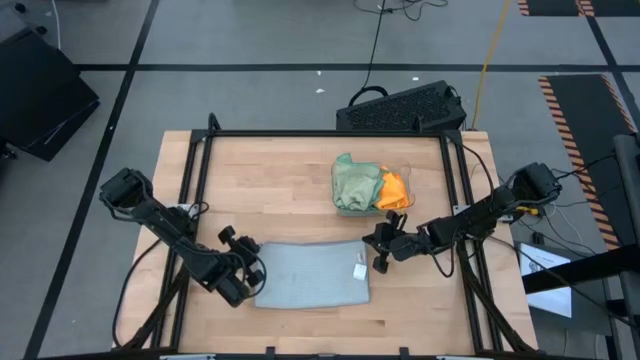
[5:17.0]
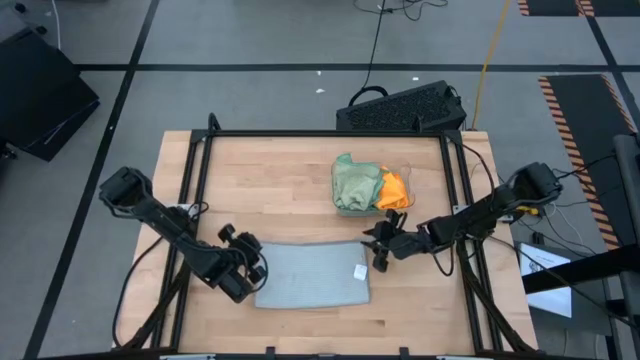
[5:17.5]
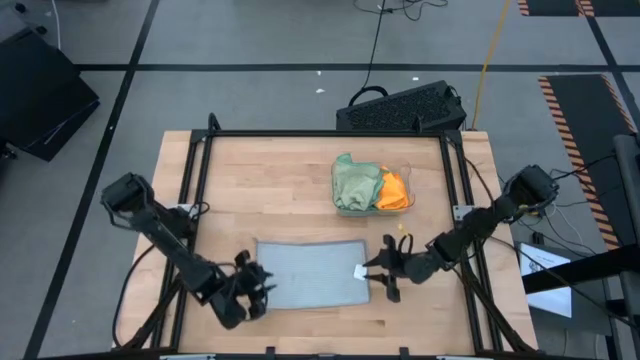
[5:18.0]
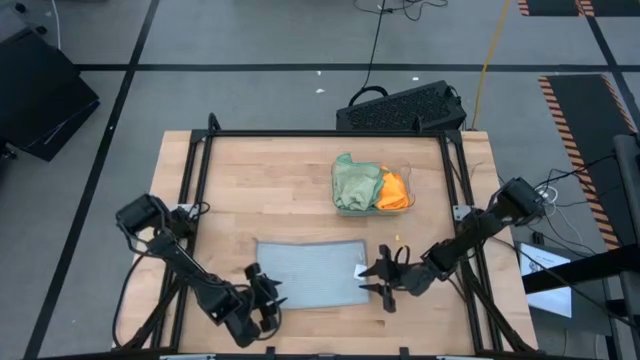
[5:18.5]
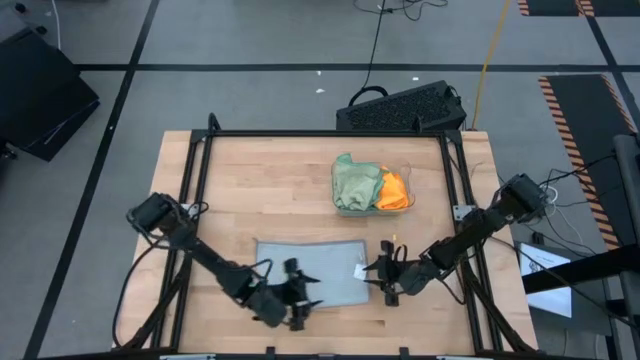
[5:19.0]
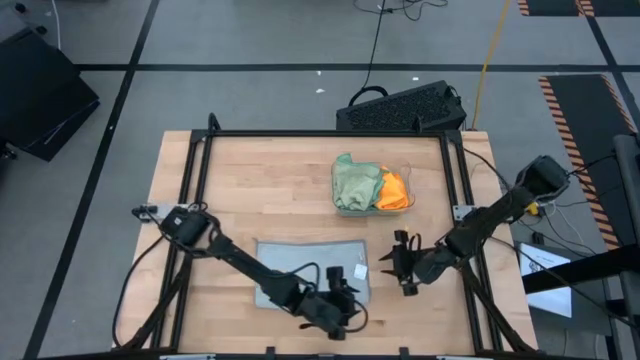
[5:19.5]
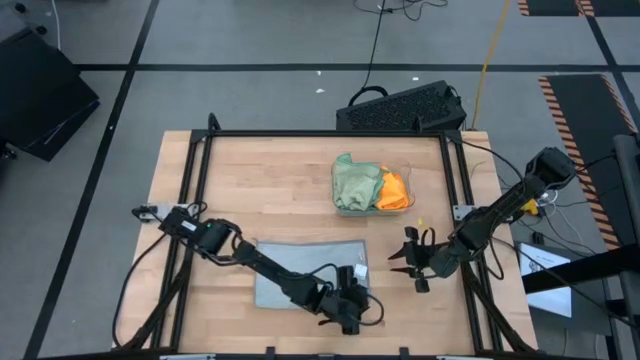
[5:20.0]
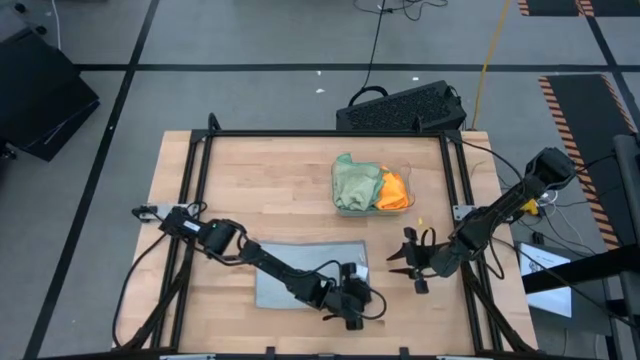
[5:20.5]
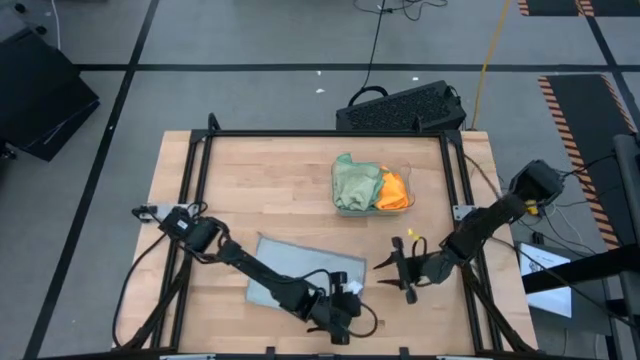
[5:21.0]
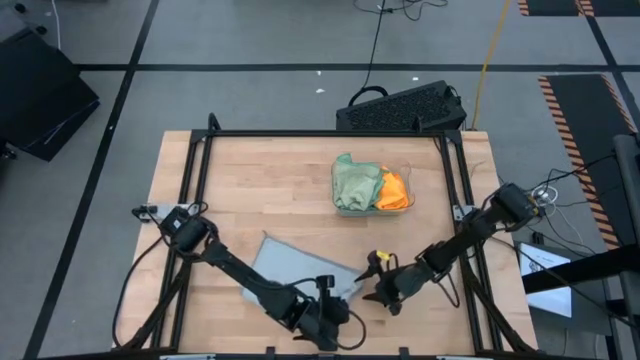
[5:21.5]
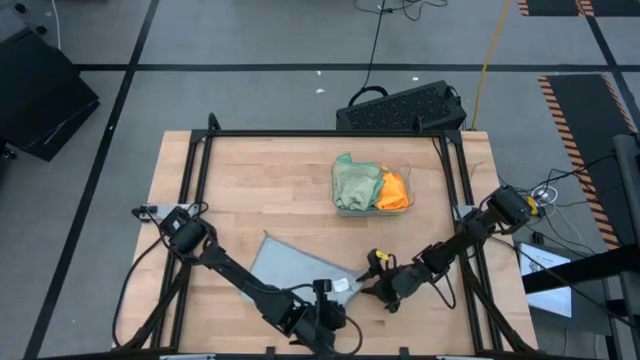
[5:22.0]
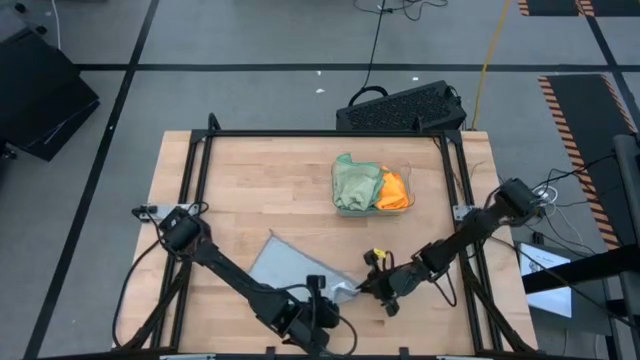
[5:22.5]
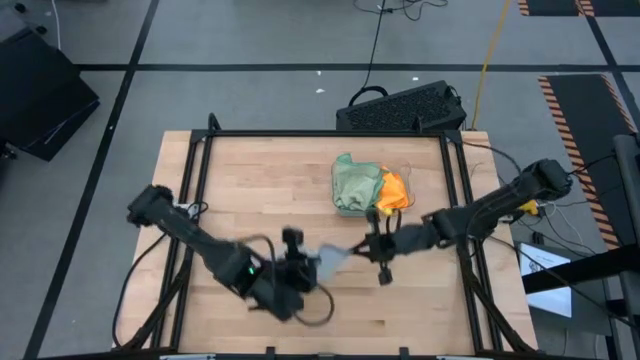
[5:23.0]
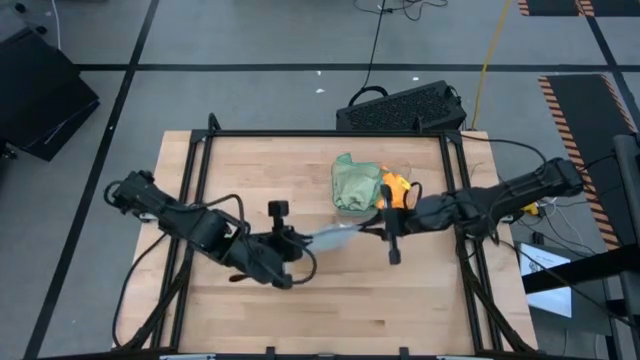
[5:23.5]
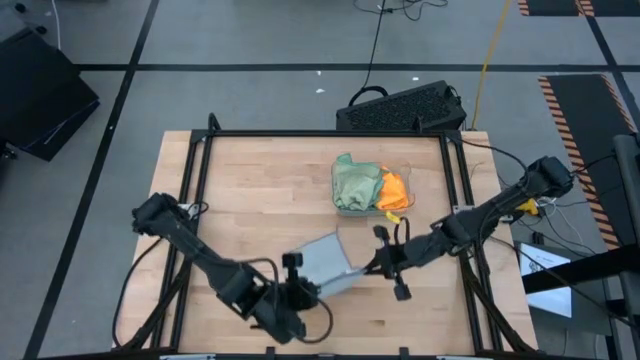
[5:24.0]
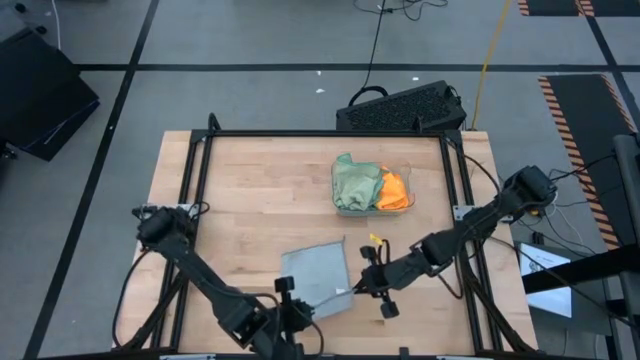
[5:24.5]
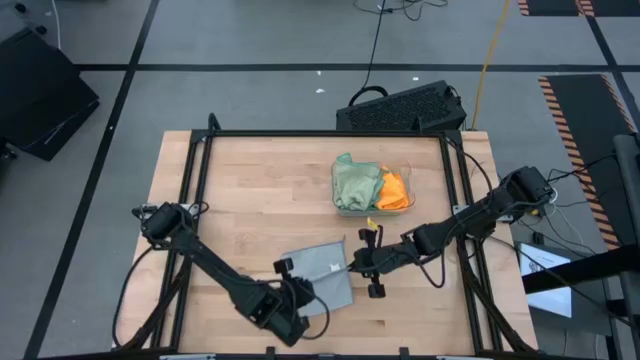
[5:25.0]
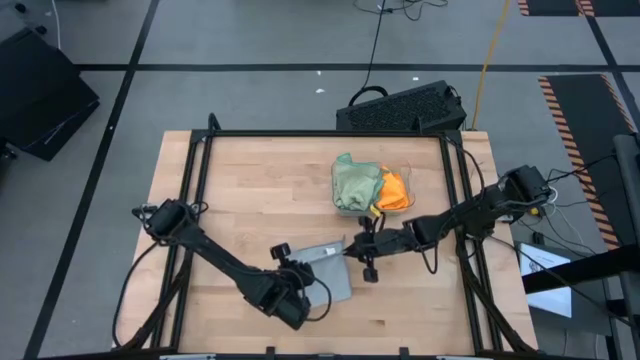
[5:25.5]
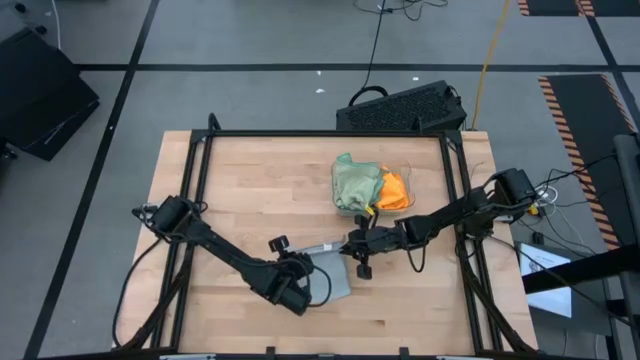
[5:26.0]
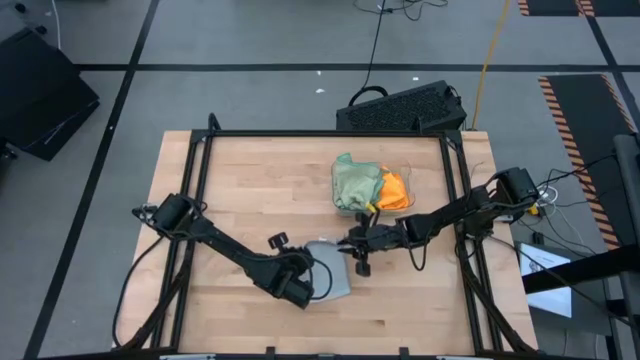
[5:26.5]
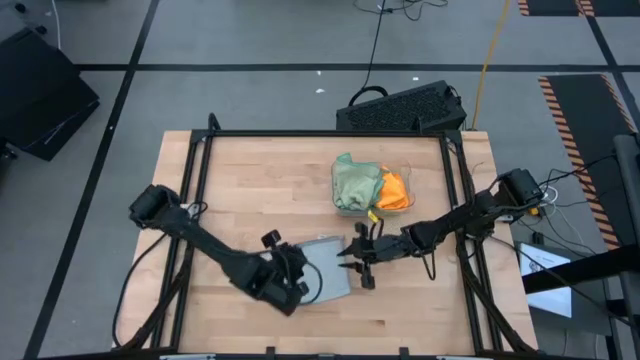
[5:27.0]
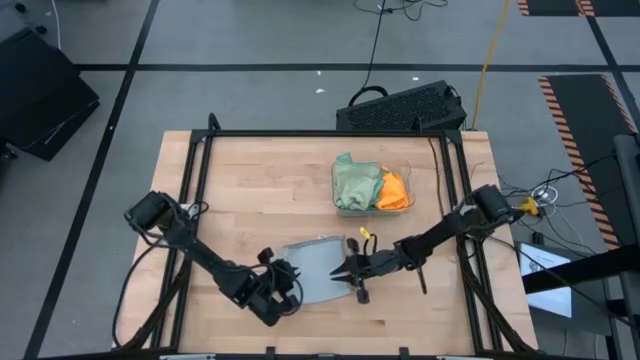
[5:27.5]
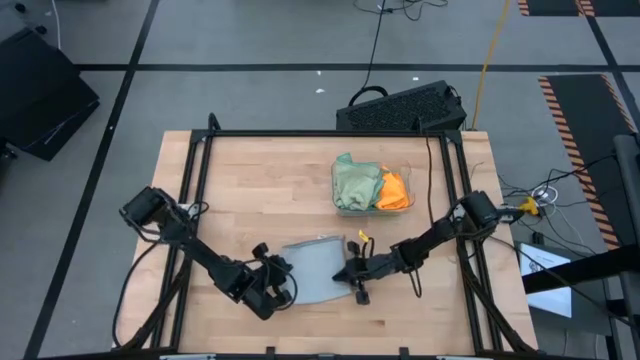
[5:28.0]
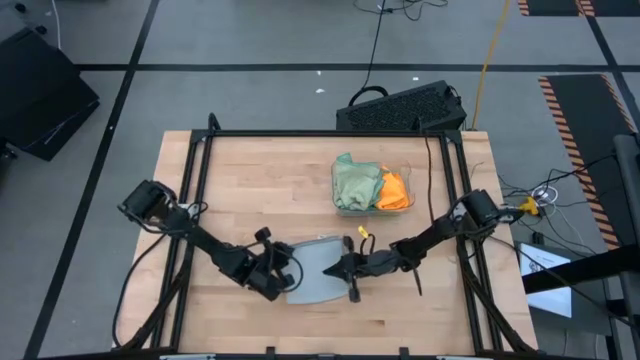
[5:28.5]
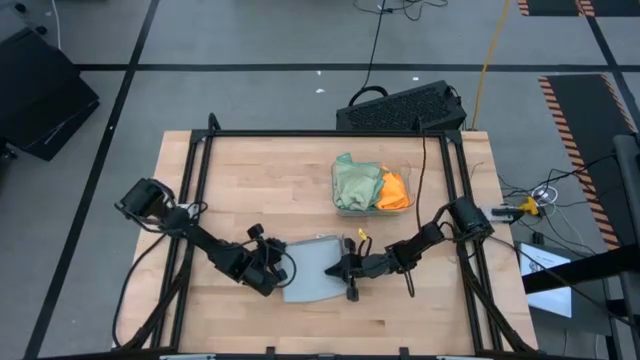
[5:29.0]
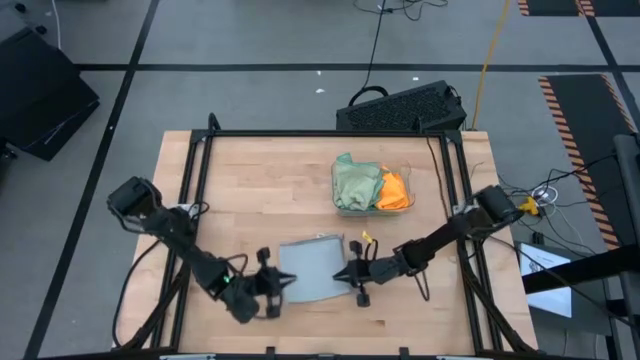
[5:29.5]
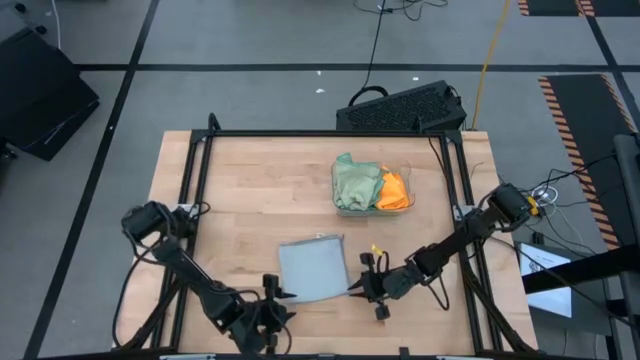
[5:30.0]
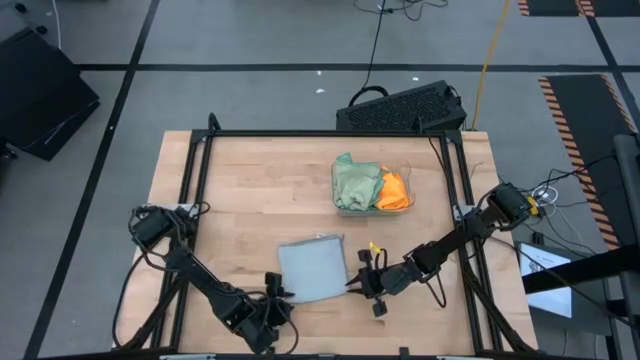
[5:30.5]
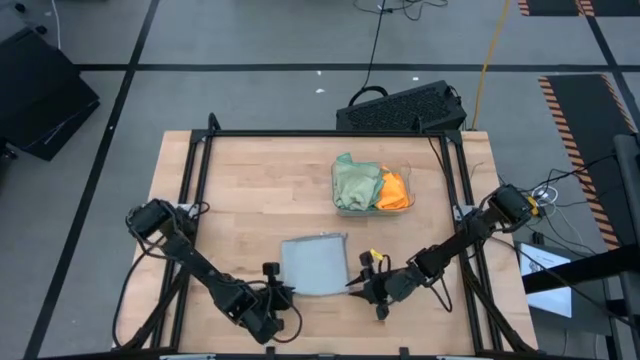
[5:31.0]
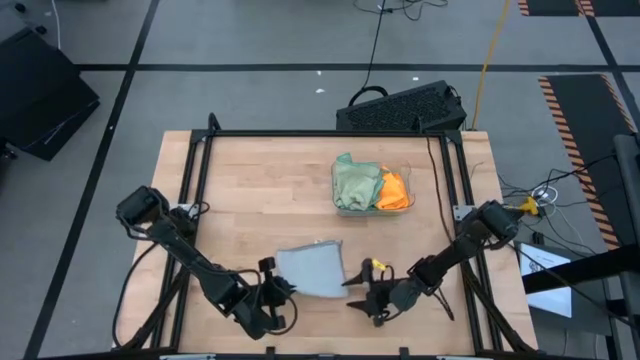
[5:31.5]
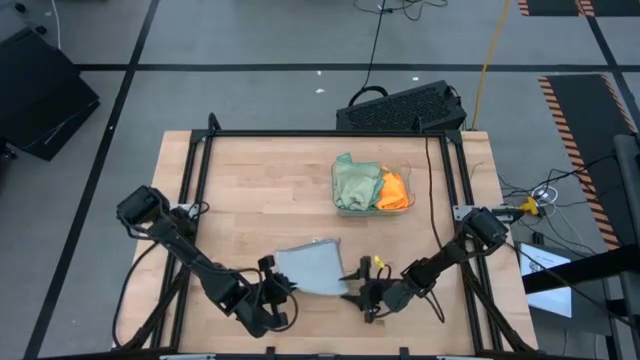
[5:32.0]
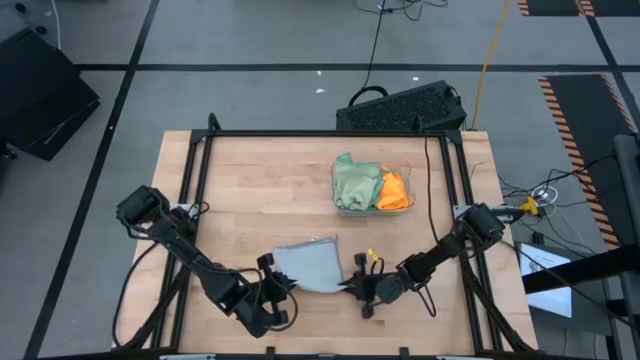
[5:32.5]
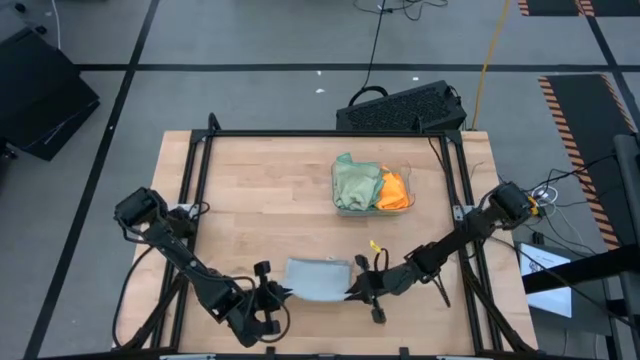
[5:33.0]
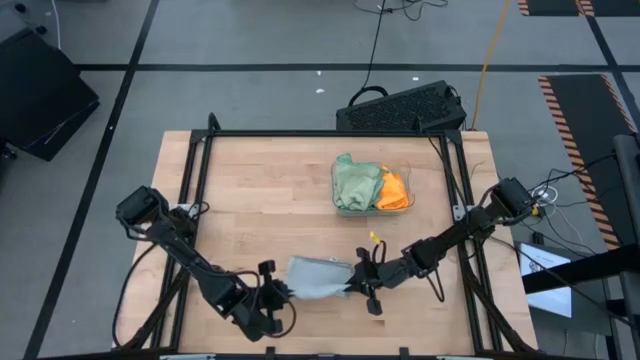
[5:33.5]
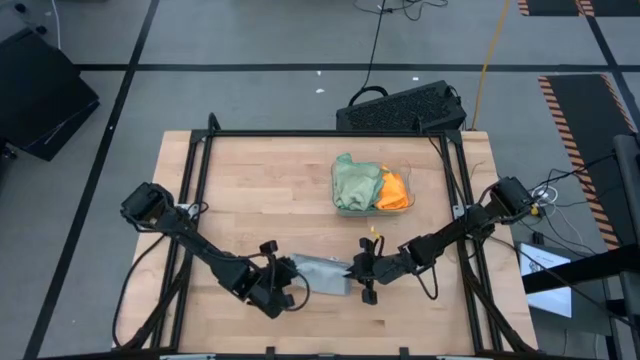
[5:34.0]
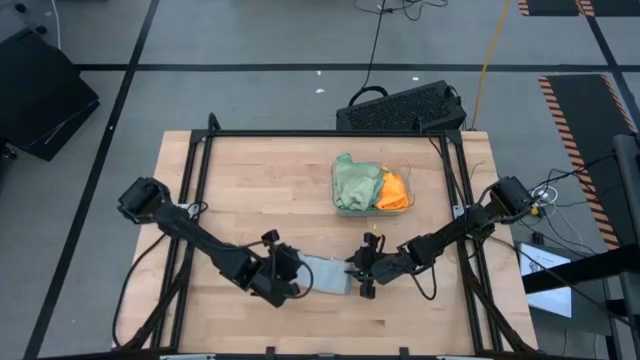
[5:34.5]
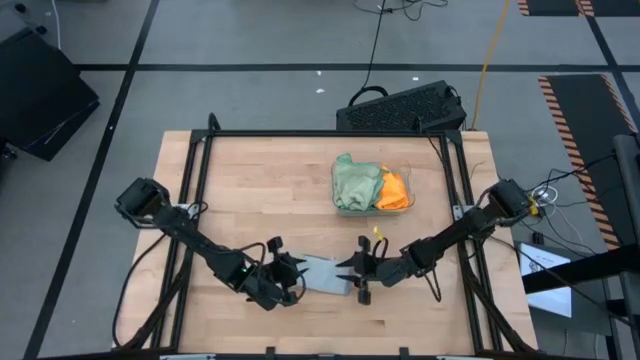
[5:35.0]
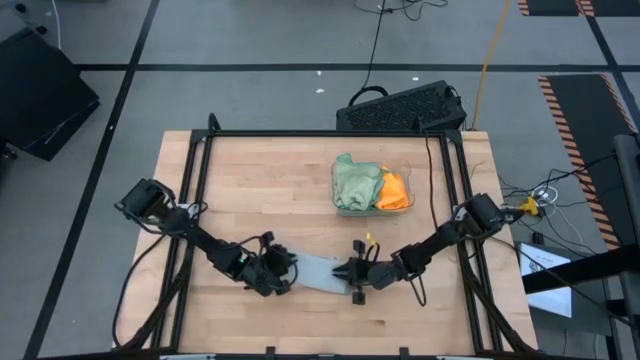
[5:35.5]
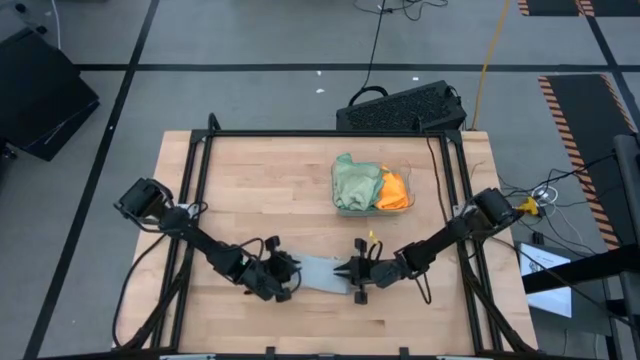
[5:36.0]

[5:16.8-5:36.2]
Task: Fold microfiber towels
Fold the gray microfiber cloth

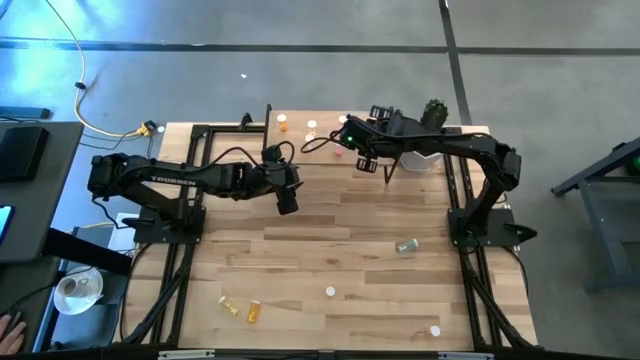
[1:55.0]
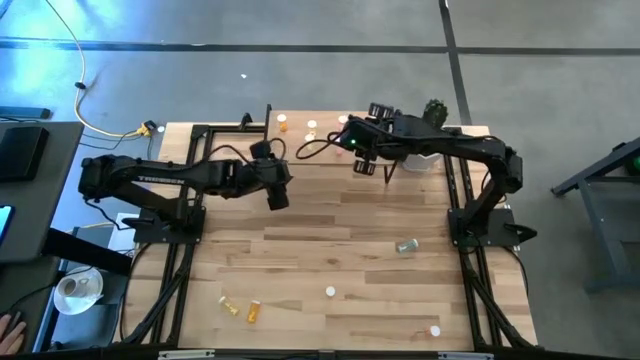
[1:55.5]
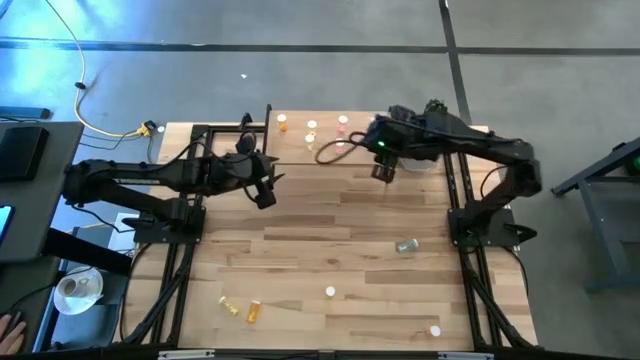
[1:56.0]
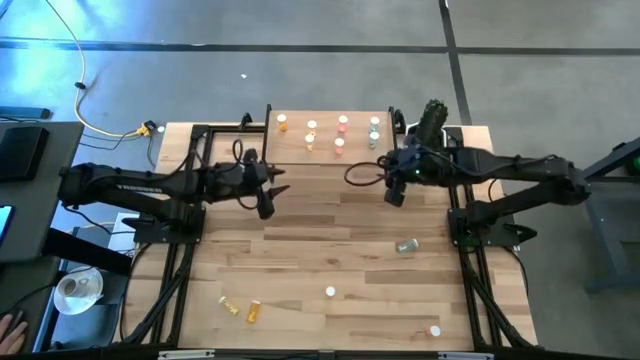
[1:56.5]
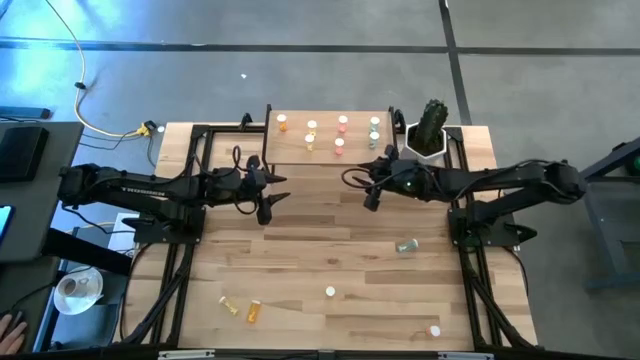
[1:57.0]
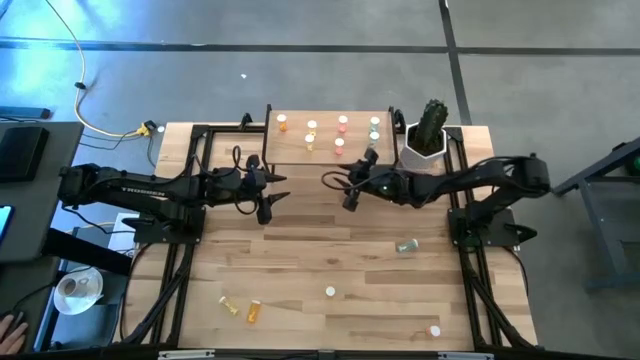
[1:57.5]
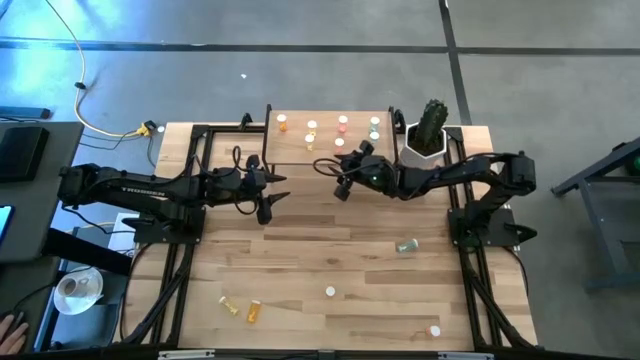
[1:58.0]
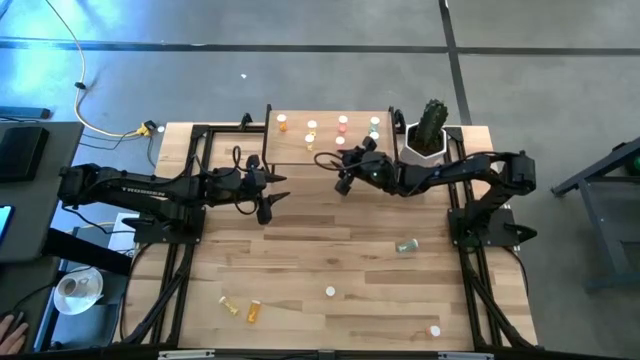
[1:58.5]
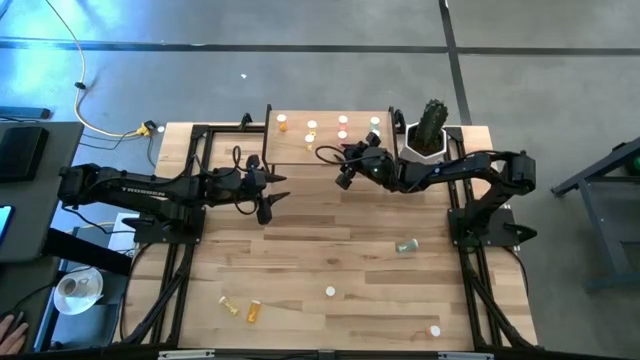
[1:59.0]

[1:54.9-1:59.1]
Task: Pick and place medicine bottles onto shelf by color
Adjust the pink pill bottle on the shelf
